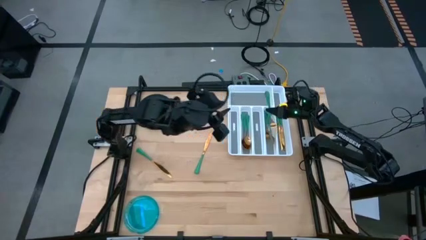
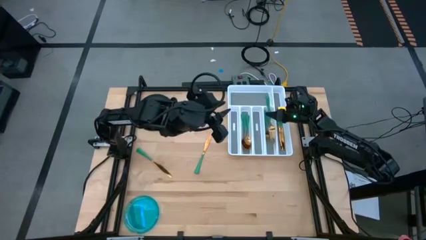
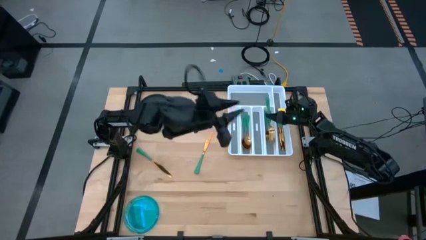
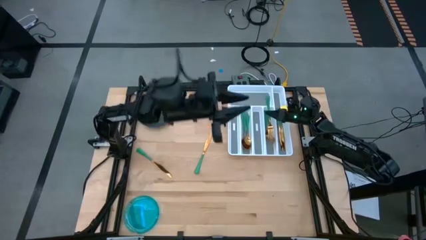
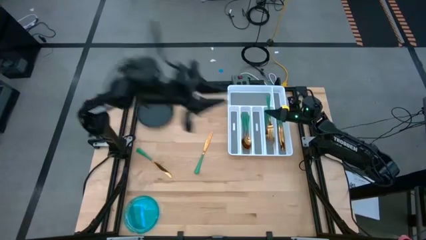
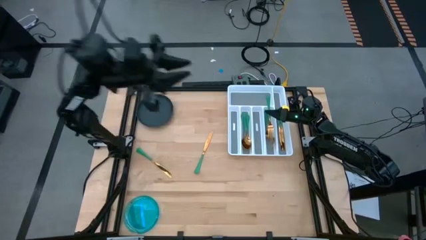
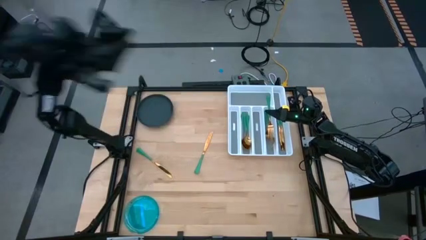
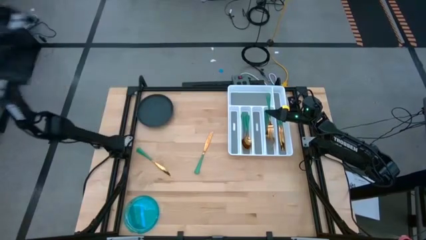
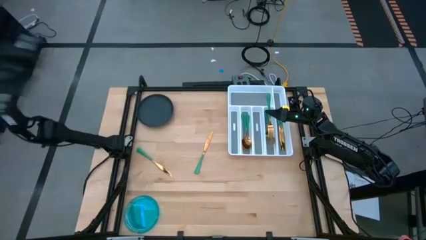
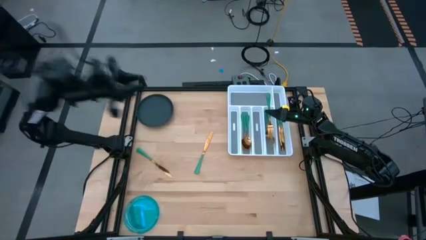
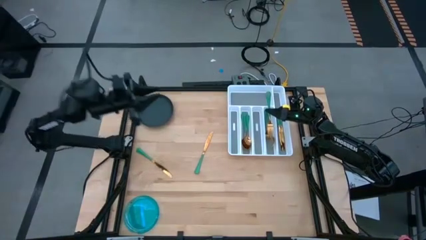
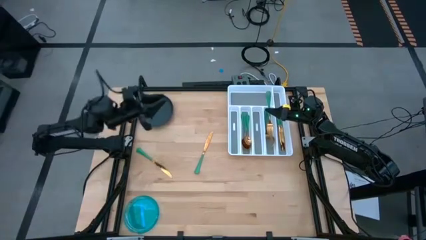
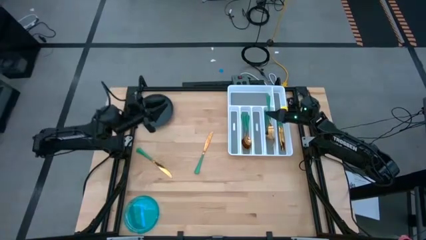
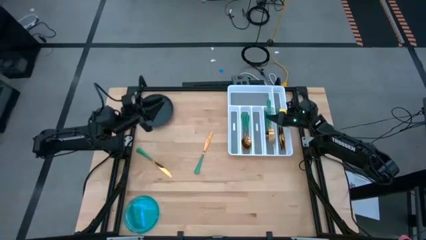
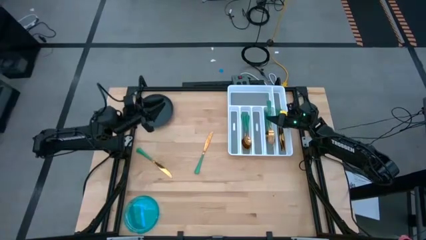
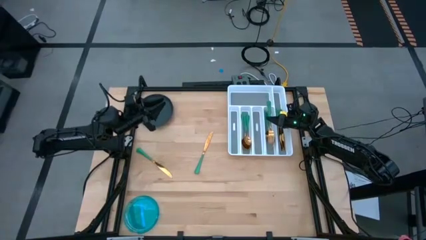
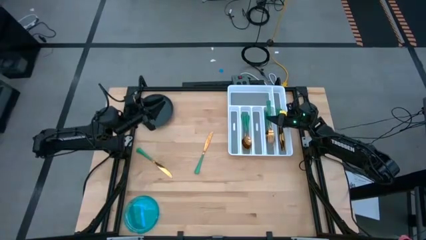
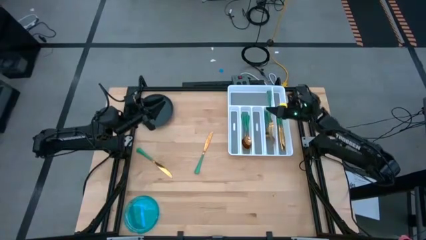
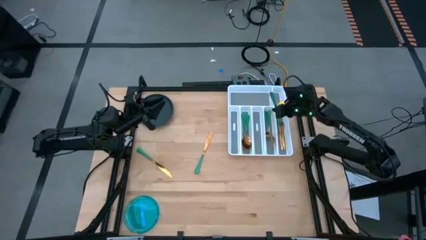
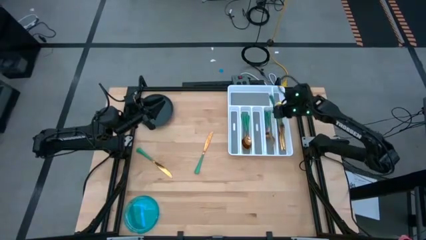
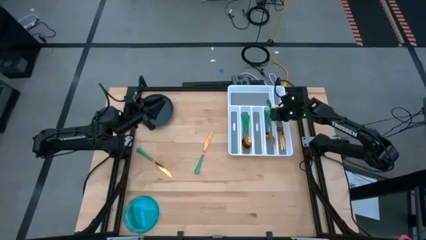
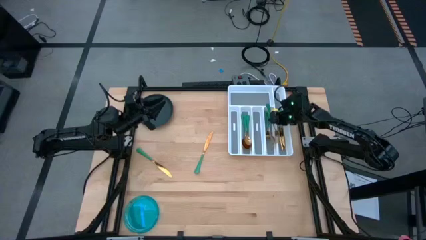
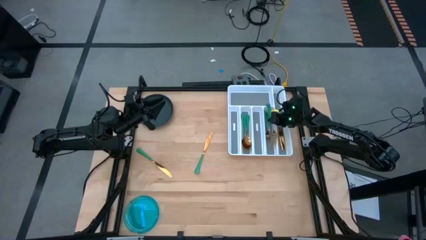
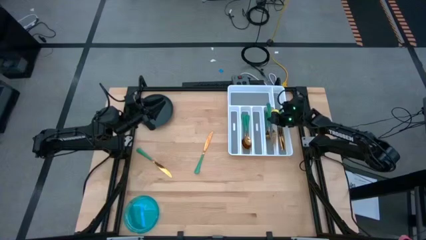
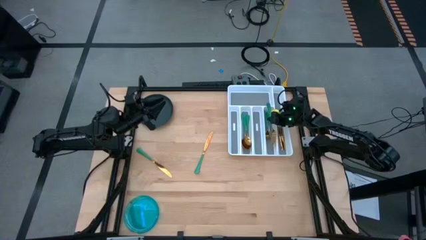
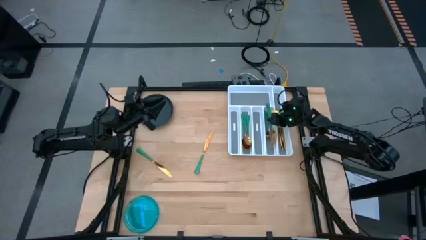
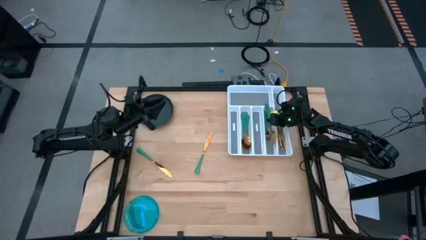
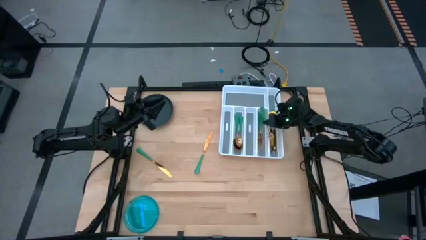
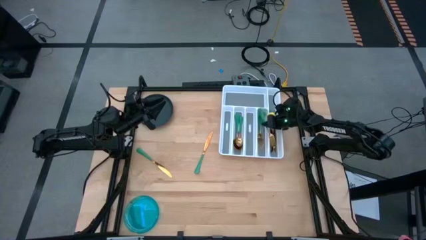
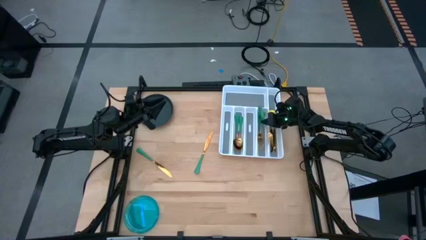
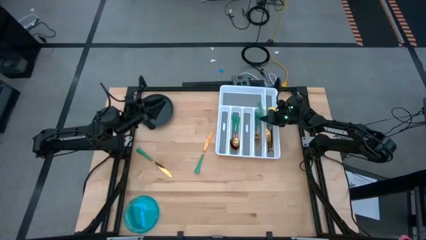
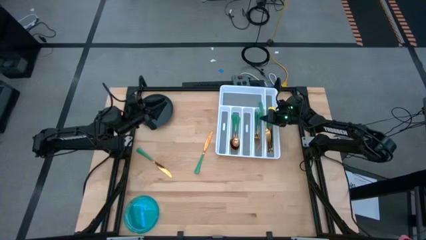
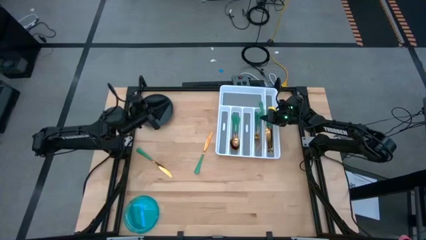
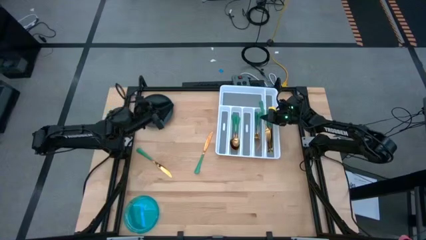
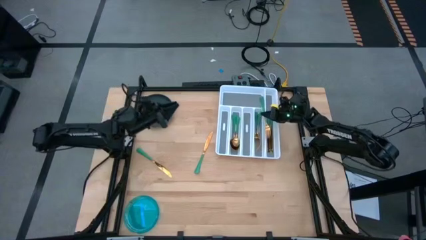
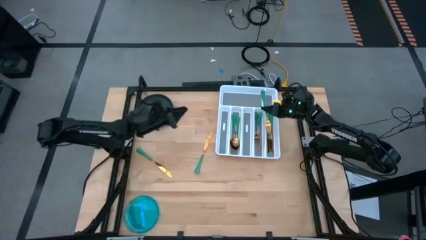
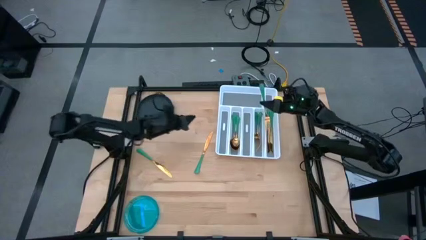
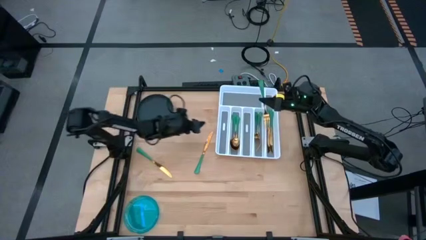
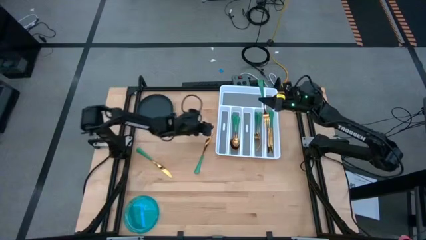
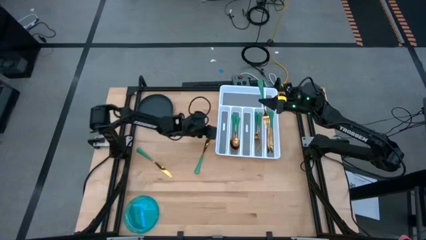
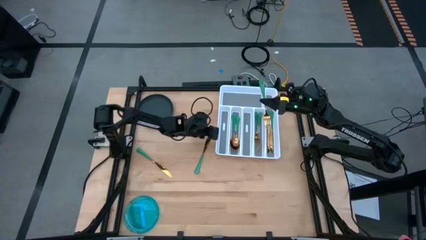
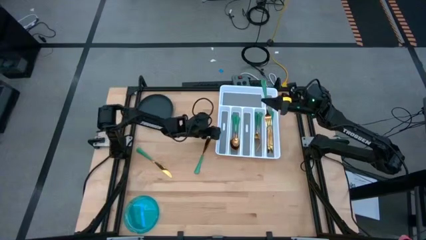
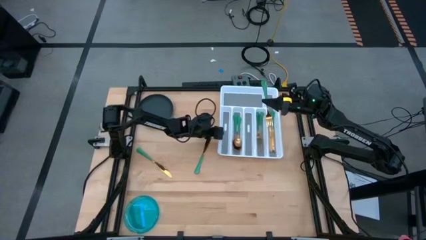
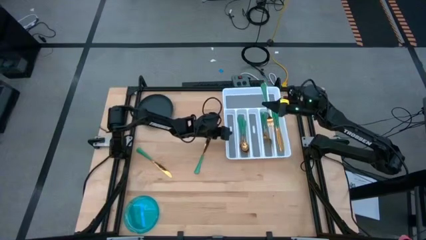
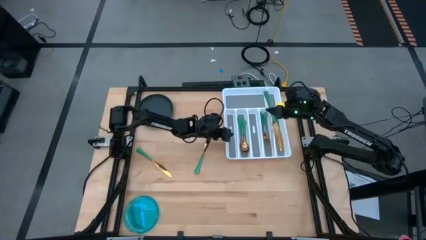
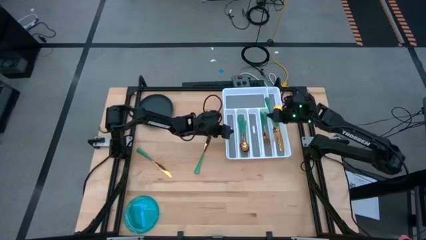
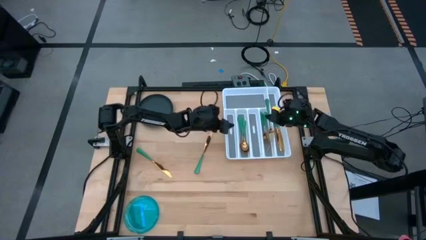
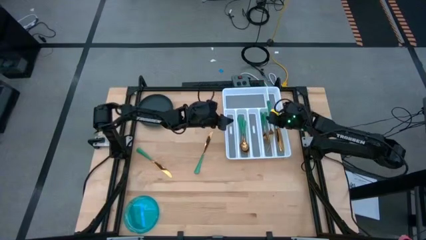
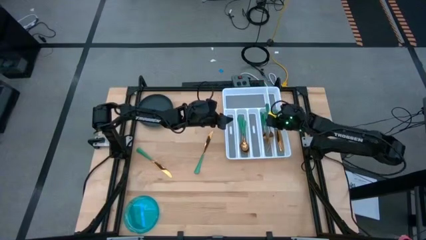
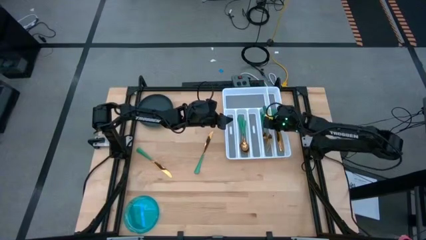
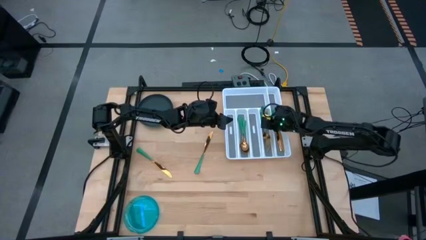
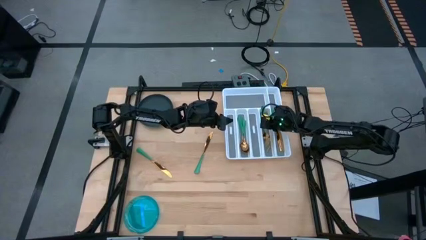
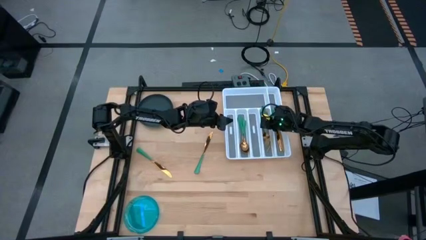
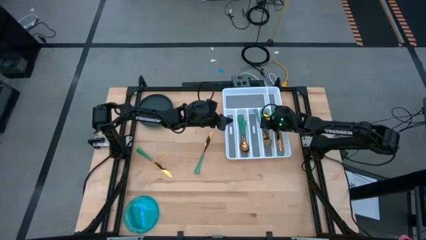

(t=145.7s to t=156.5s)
Task: Sort silverware
Put the green fork into the silverware tray

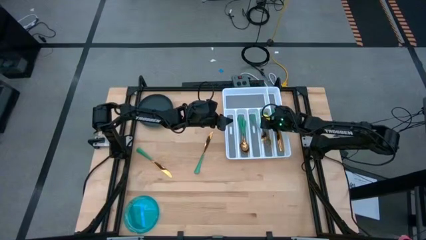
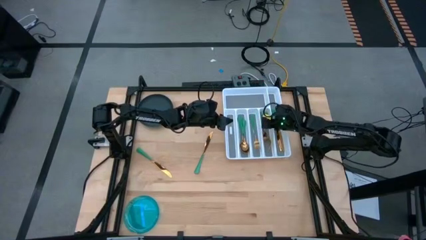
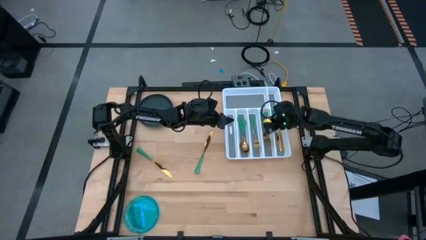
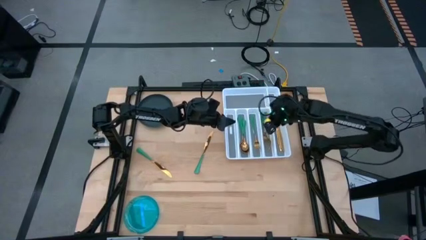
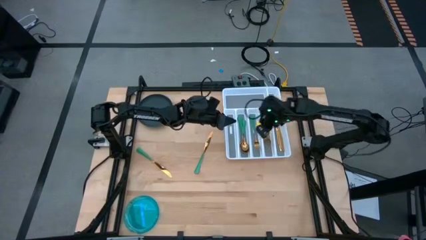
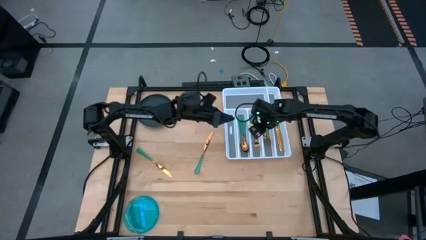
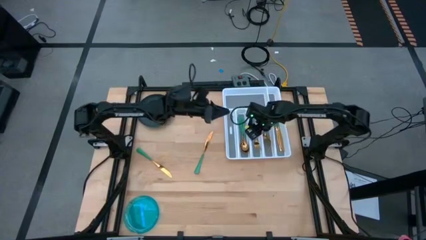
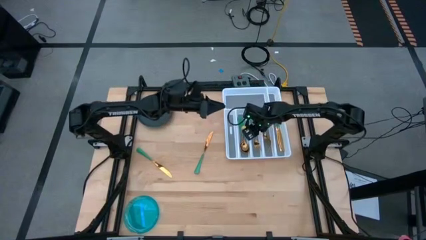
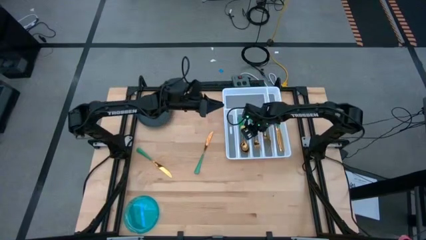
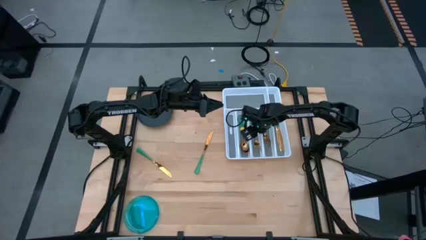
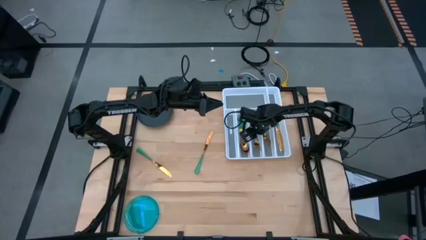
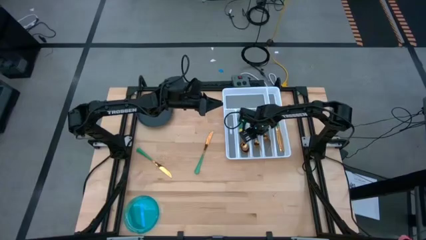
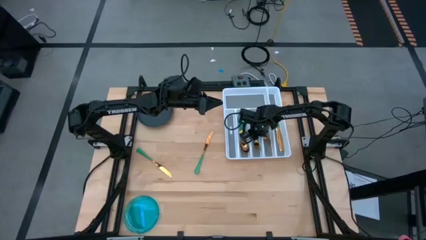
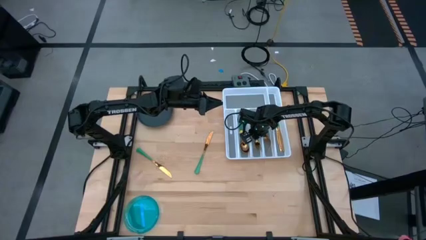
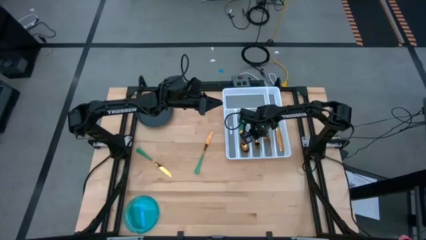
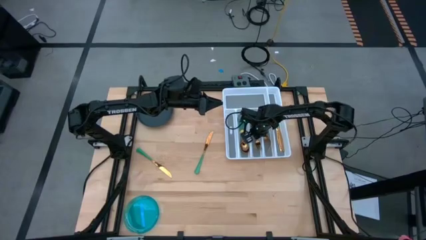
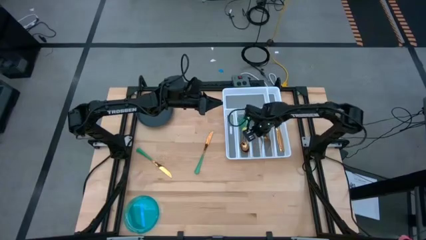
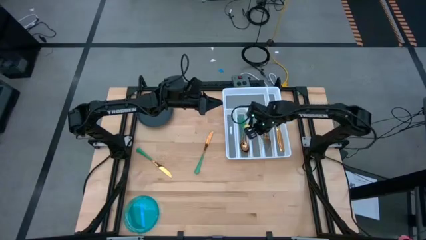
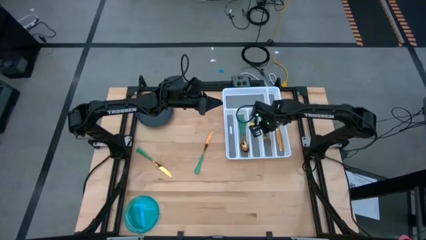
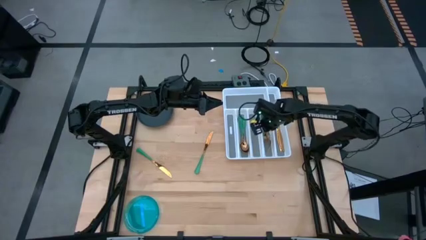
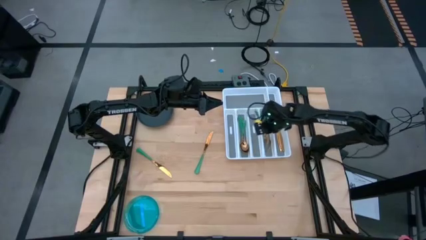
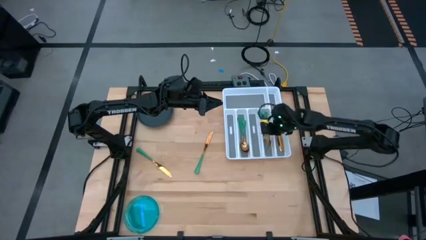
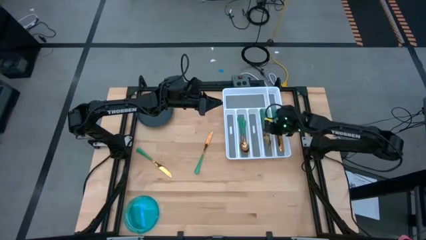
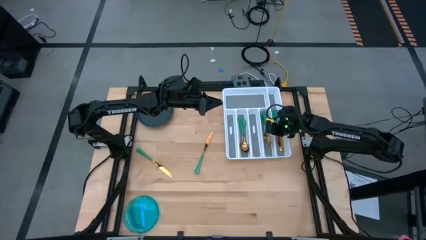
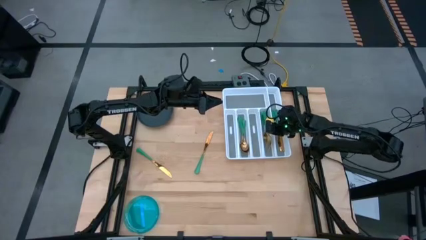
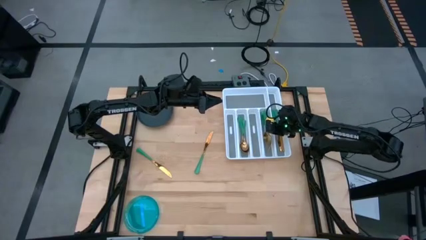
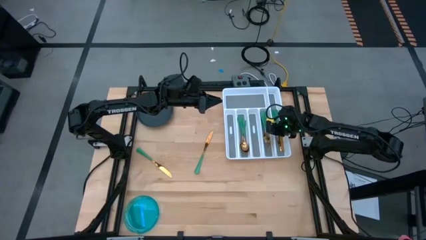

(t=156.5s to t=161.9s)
Put the green fork into the silverware tray
